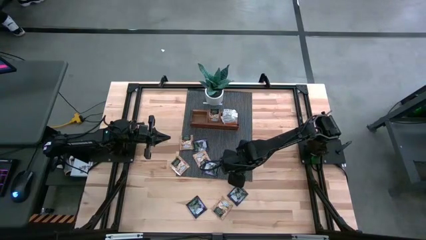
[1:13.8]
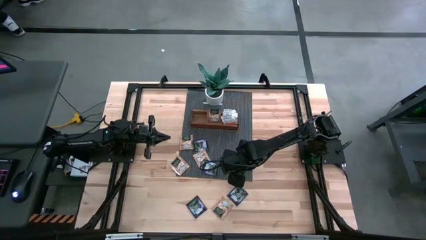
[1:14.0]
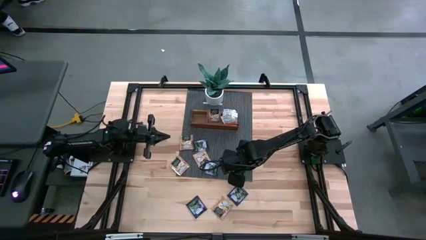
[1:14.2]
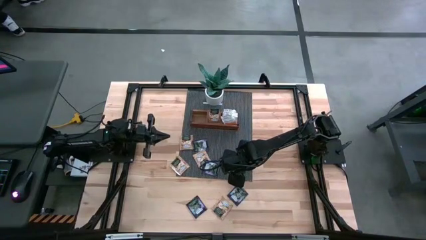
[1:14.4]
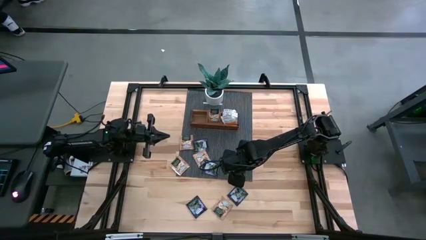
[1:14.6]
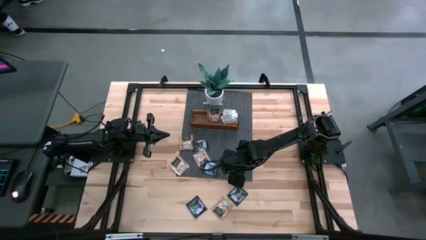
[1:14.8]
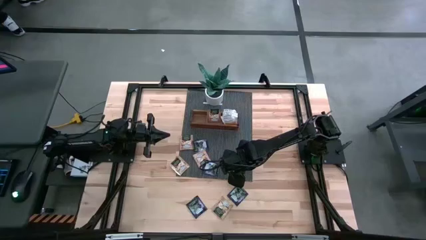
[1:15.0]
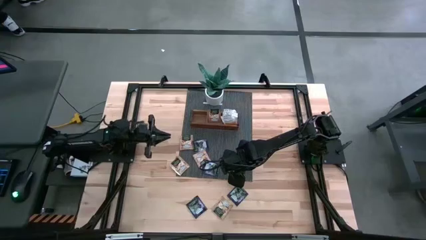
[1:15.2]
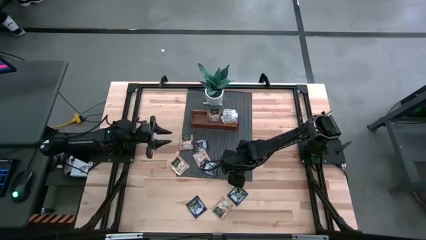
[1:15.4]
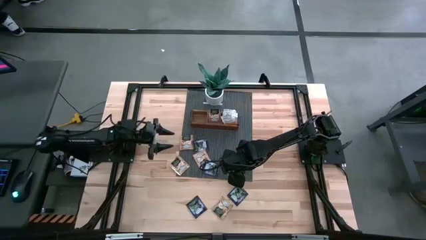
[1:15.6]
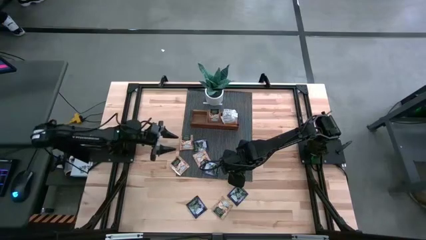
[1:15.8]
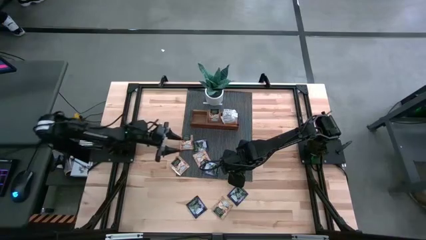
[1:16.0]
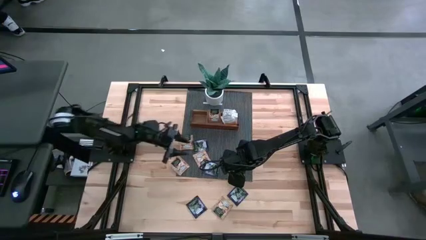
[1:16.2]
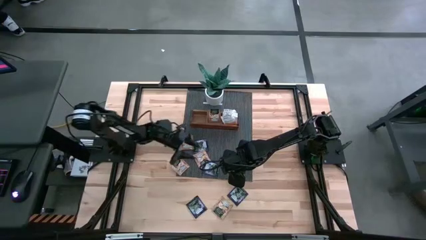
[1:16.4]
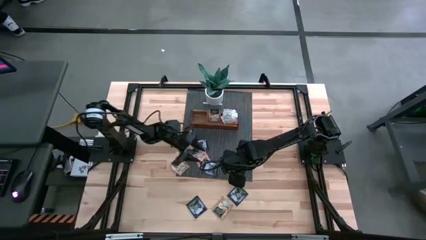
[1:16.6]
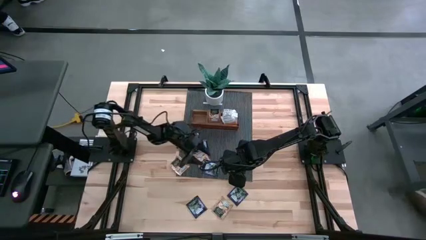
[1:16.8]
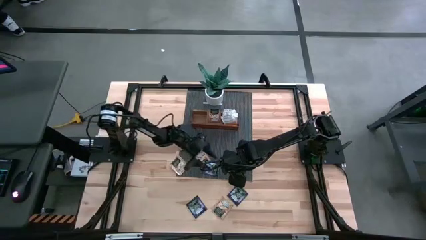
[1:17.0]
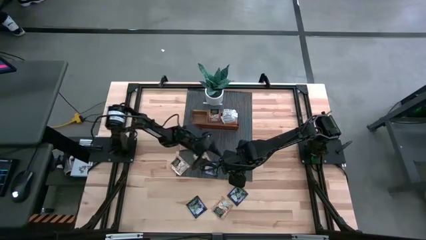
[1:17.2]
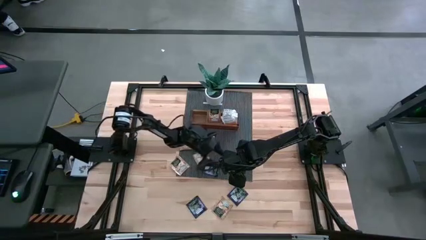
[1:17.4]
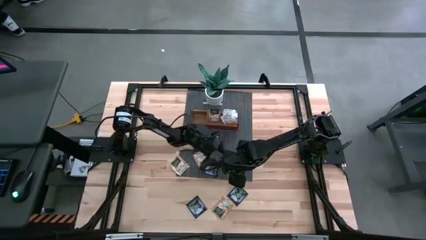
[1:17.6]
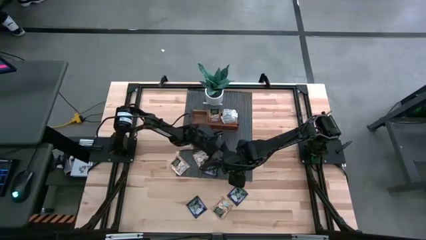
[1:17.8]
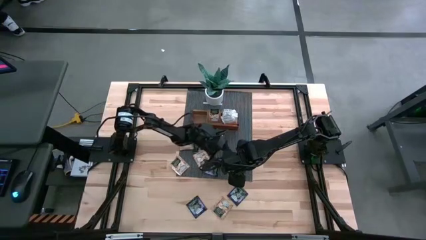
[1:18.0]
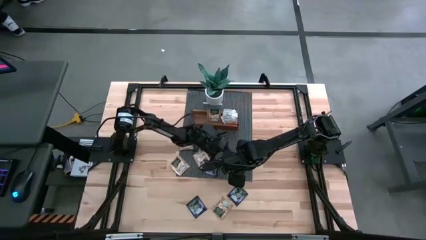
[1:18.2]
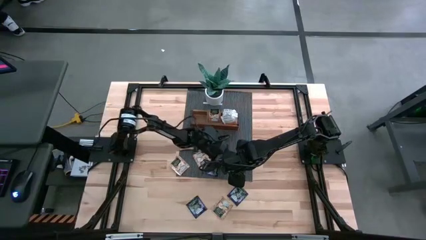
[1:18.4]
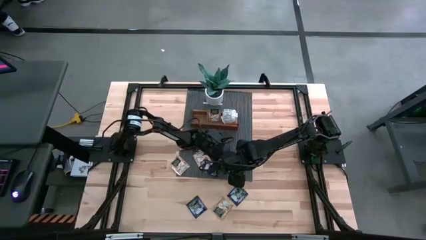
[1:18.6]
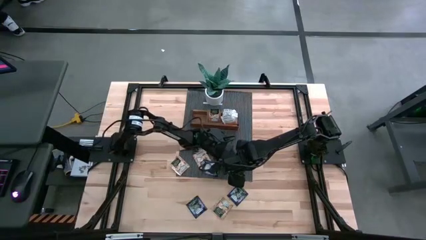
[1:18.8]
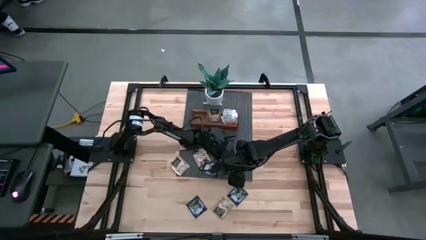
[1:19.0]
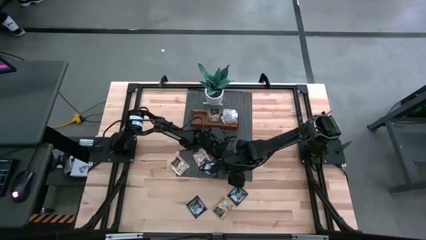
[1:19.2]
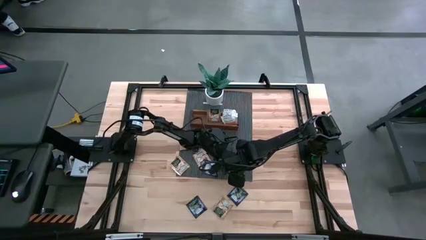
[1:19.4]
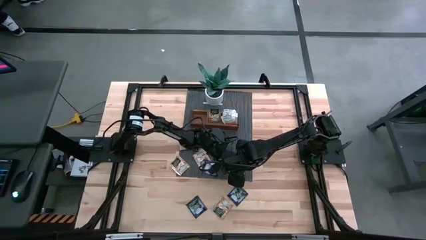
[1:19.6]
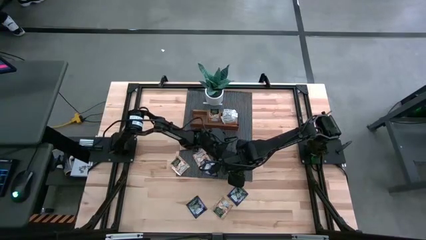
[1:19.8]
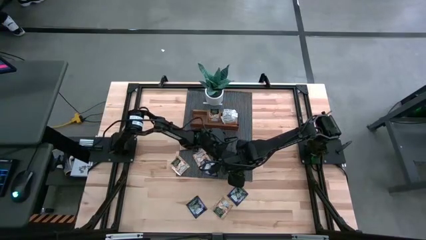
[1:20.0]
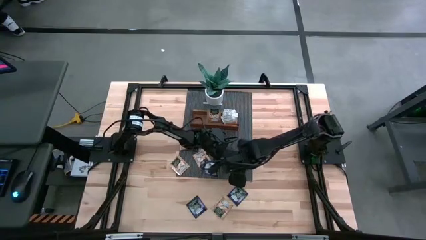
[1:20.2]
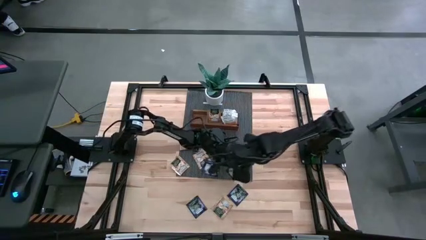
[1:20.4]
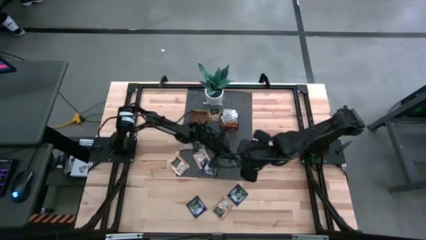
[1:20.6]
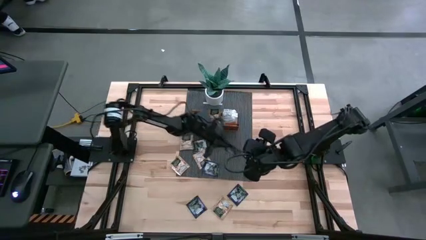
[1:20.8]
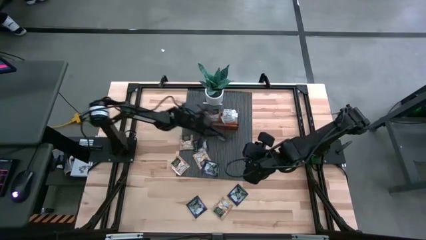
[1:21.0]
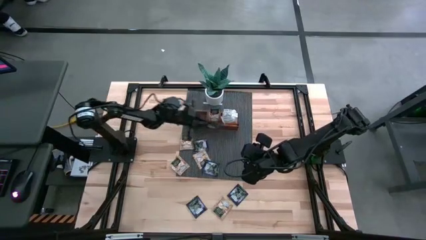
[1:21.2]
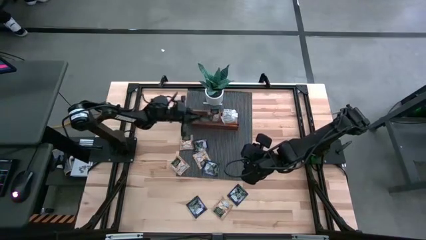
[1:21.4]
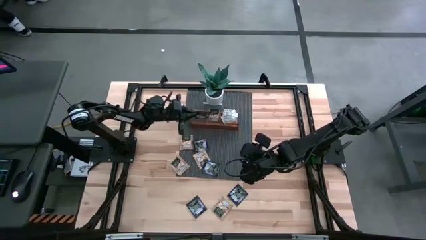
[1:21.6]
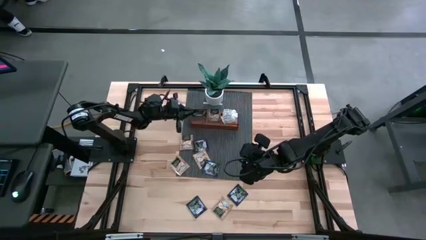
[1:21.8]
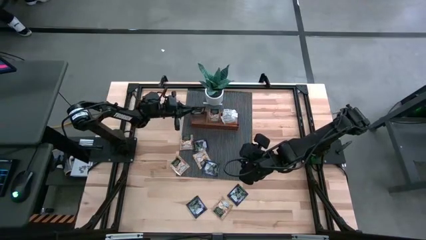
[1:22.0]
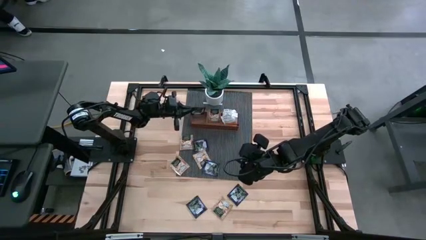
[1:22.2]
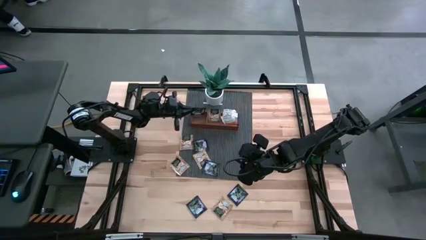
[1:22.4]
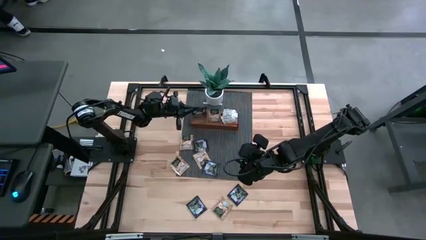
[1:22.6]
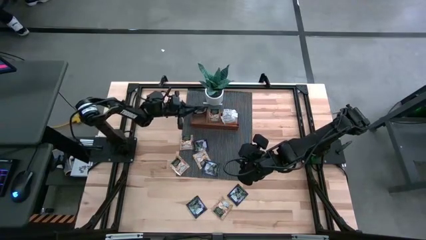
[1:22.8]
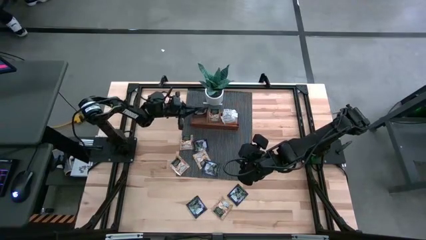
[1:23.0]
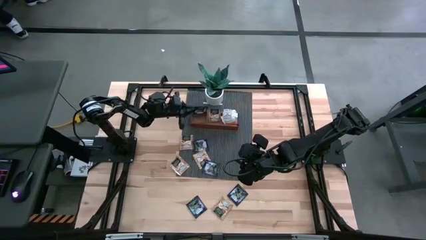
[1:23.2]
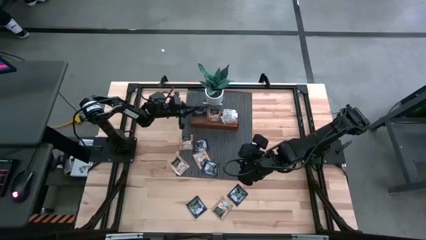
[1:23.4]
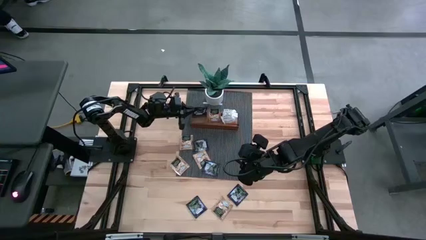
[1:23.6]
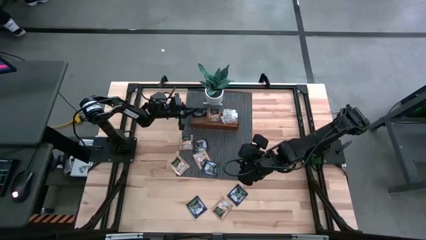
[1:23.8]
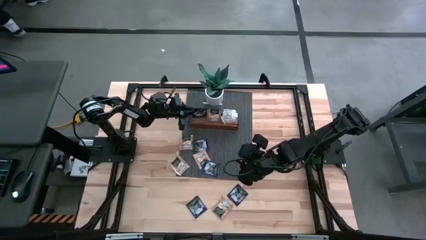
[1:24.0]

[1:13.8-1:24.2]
Task: Pick & Place Tea
Put the purple tea bag into the left section of the wooden organizer

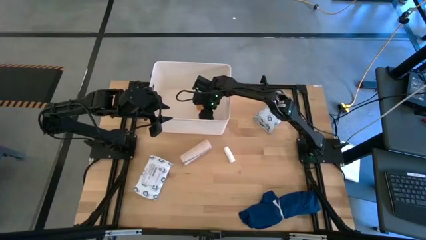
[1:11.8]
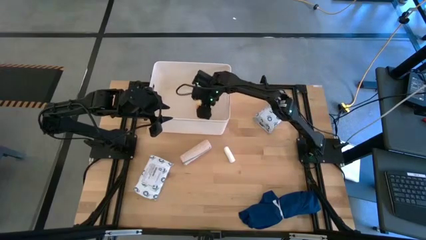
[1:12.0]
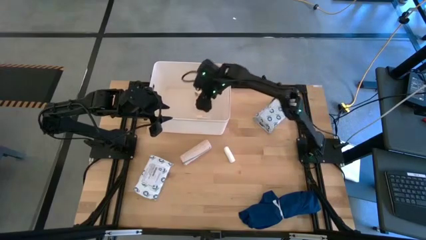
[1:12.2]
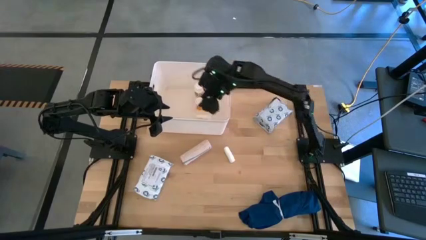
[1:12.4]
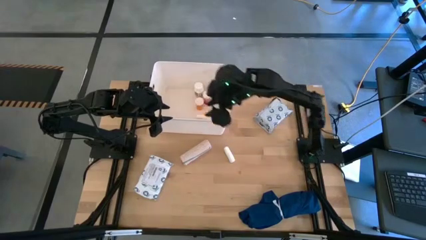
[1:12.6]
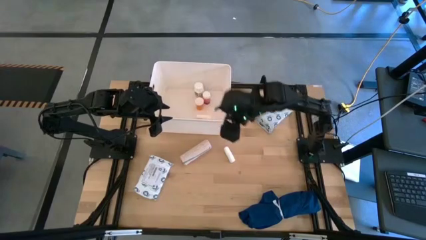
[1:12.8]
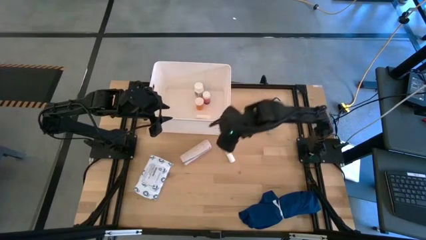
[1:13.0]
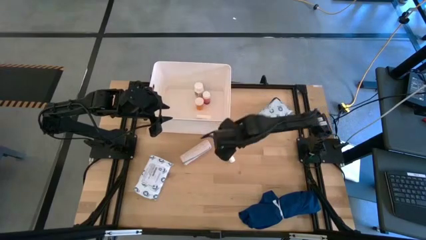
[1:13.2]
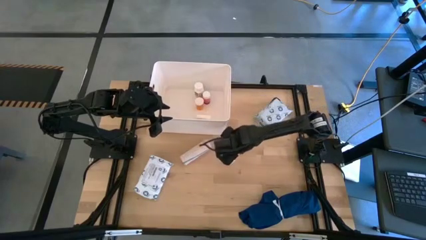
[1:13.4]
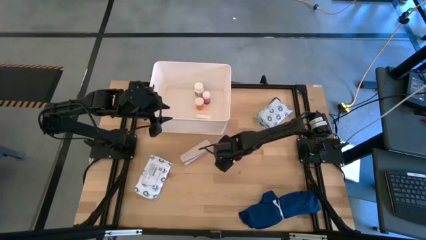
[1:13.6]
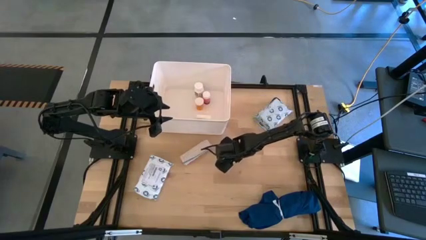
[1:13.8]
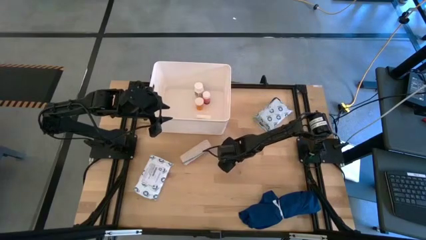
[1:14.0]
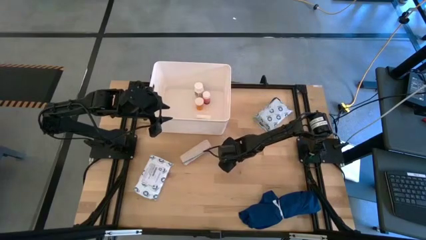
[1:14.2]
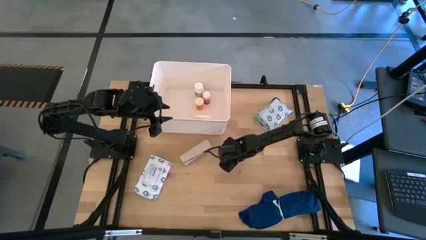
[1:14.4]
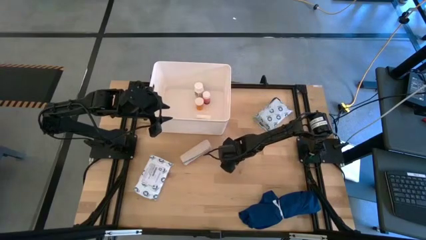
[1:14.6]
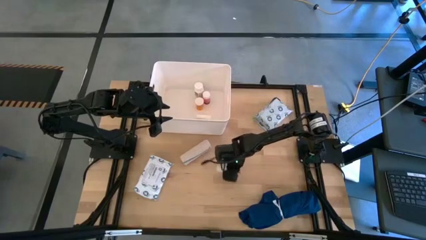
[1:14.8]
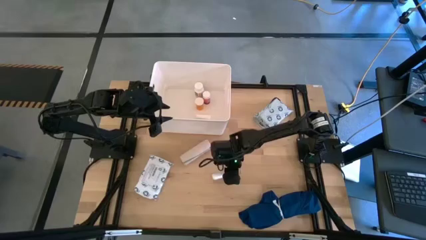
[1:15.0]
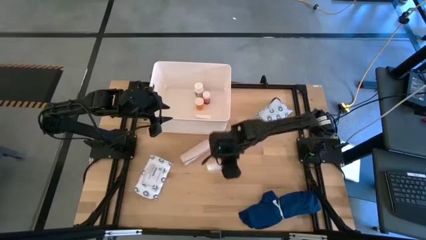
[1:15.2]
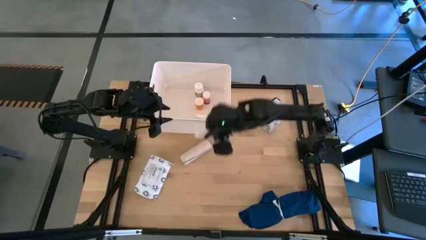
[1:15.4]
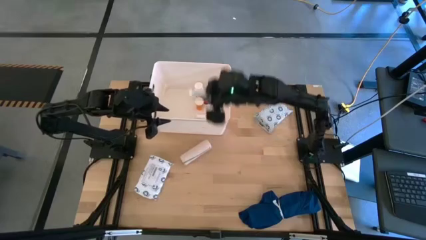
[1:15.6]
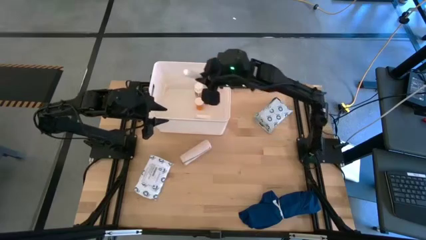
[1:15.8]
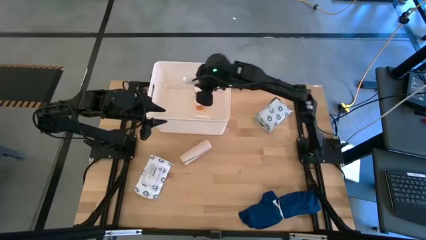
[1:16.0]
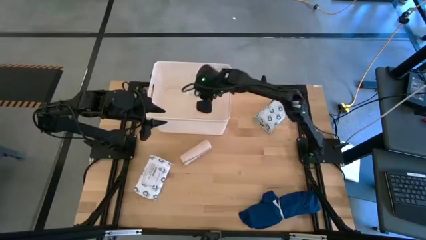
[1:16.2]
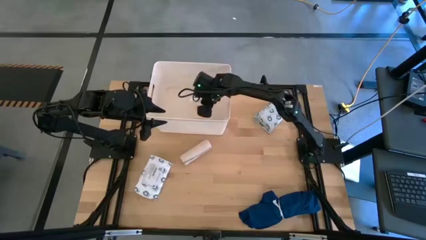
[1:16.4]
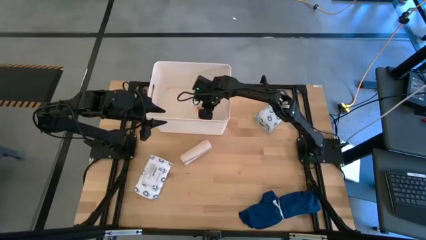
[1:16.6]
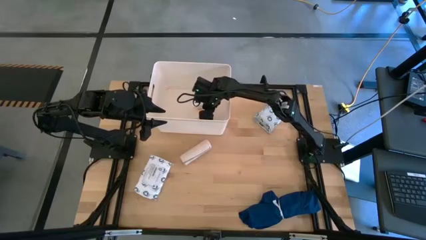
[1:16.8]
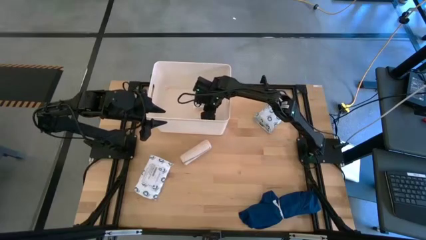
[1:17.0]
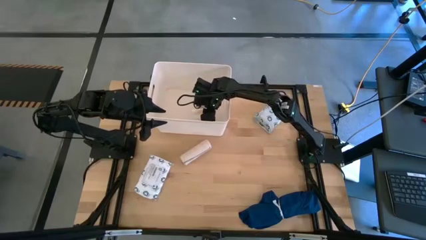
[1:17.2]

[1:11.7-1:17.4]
Task: Pick & place medical supplies in basket/bin
Put the rolled gauze into the white bin
